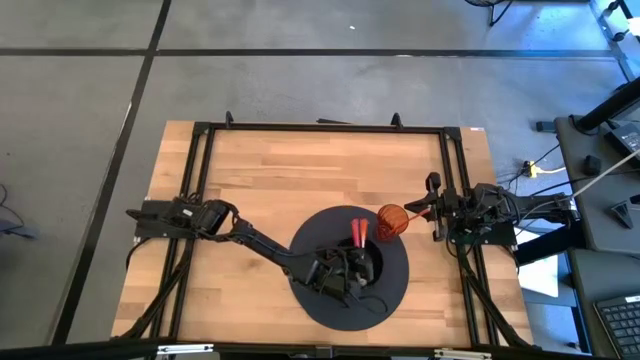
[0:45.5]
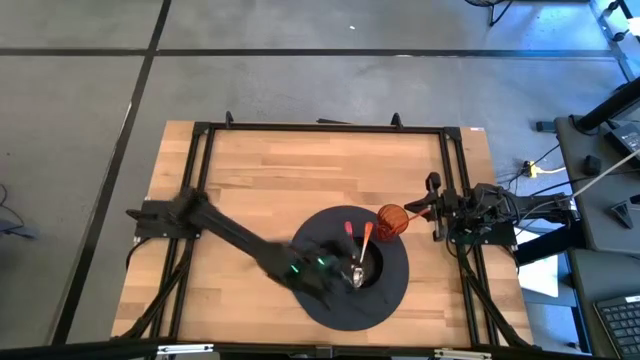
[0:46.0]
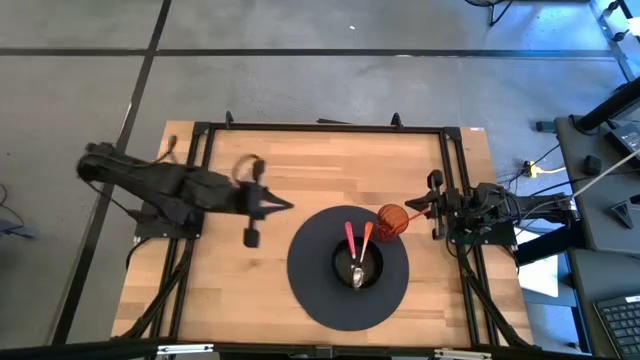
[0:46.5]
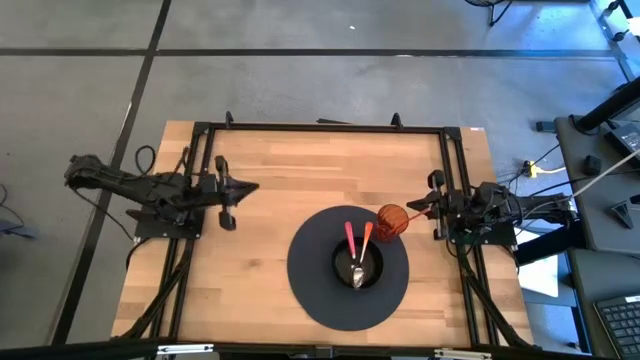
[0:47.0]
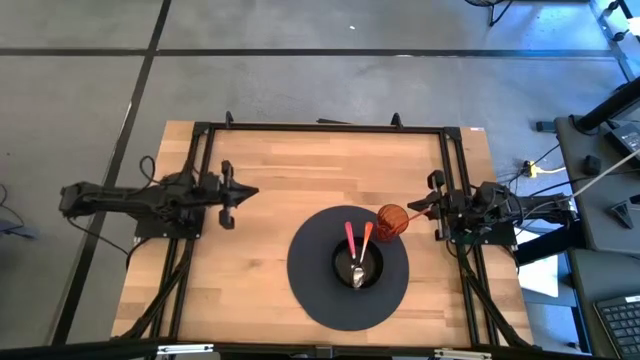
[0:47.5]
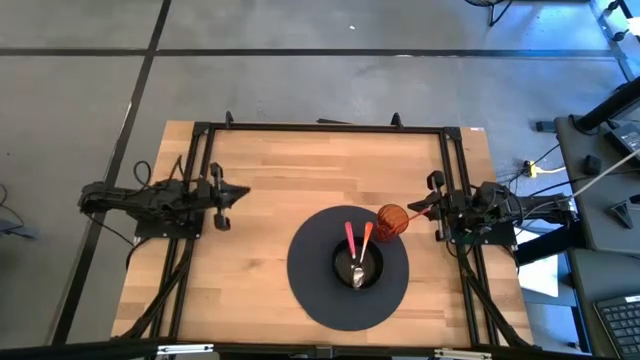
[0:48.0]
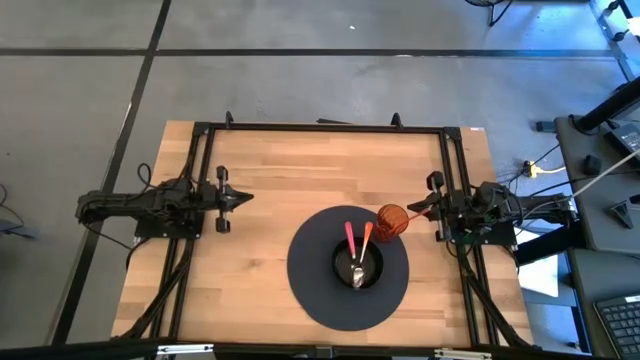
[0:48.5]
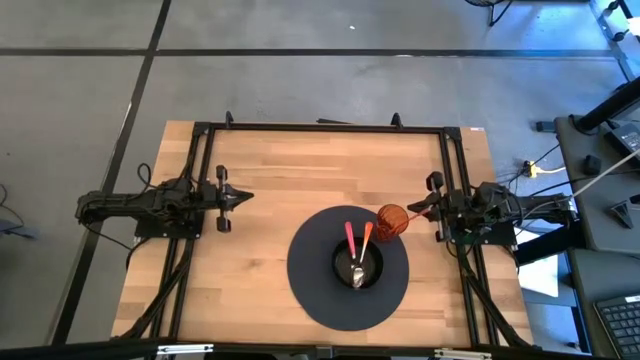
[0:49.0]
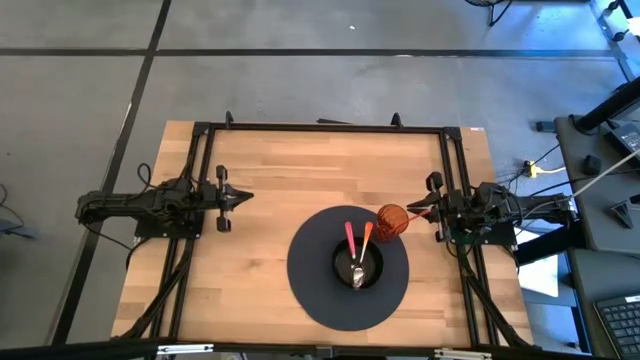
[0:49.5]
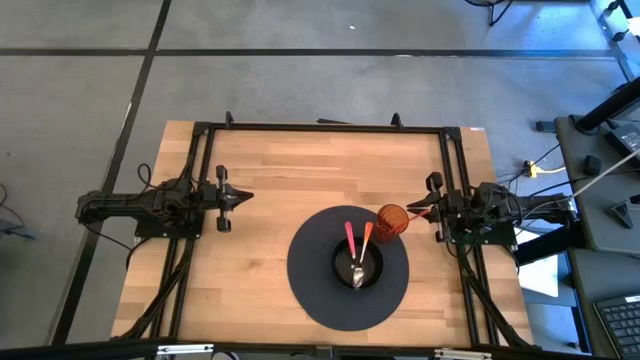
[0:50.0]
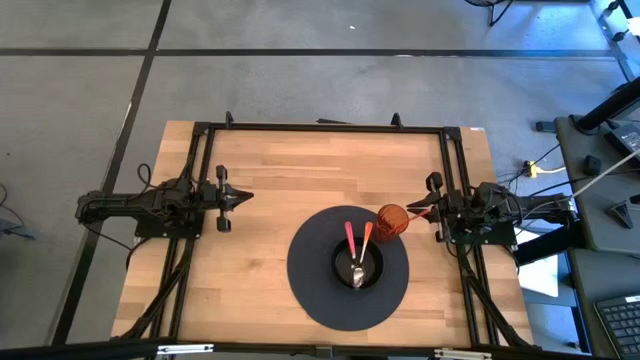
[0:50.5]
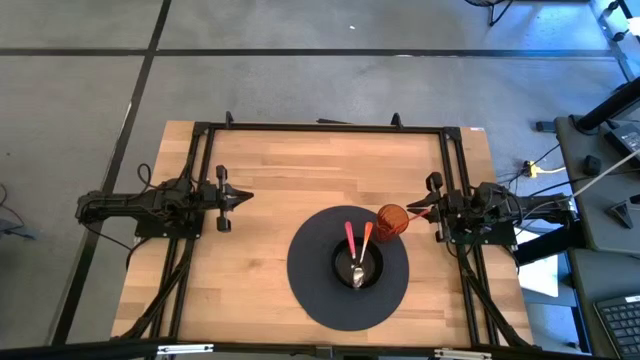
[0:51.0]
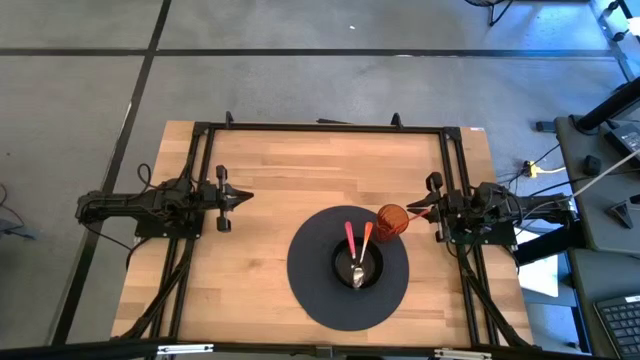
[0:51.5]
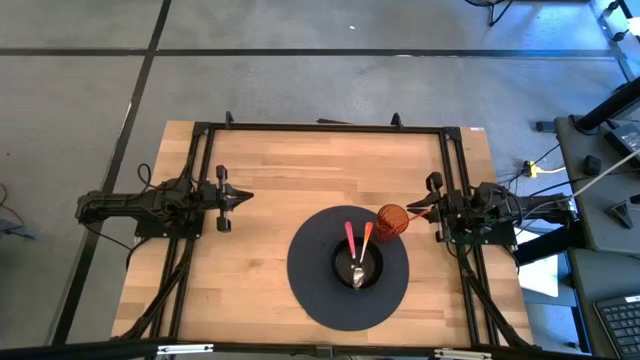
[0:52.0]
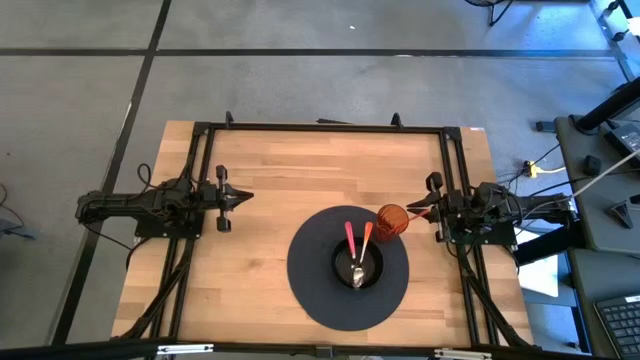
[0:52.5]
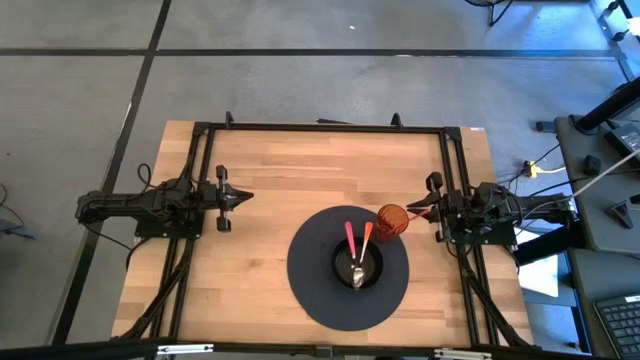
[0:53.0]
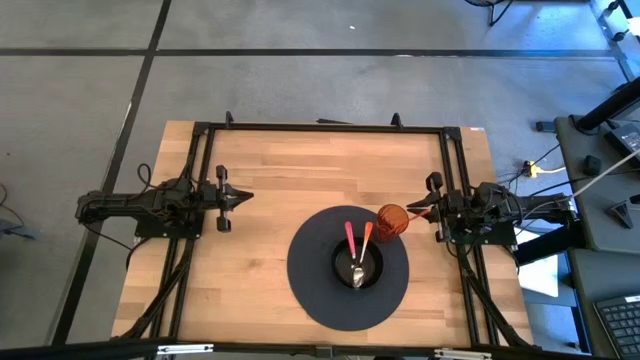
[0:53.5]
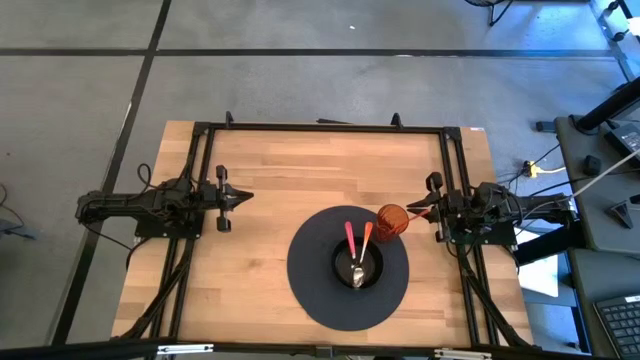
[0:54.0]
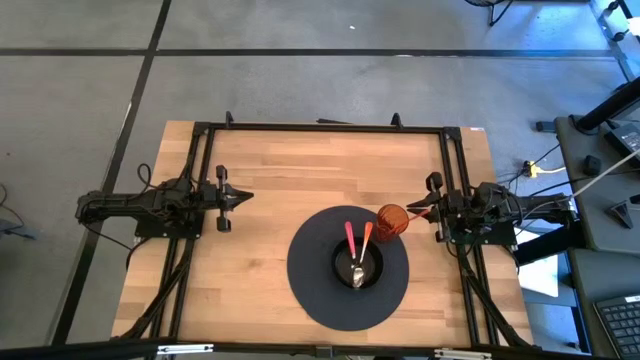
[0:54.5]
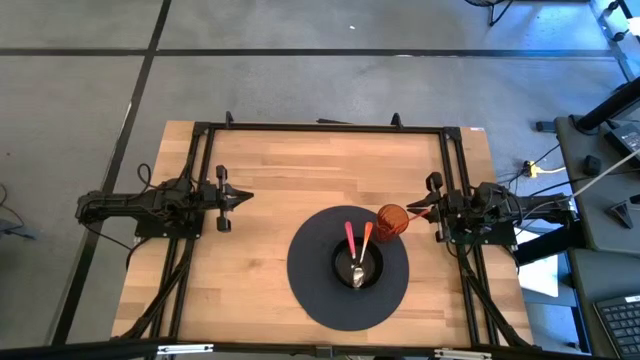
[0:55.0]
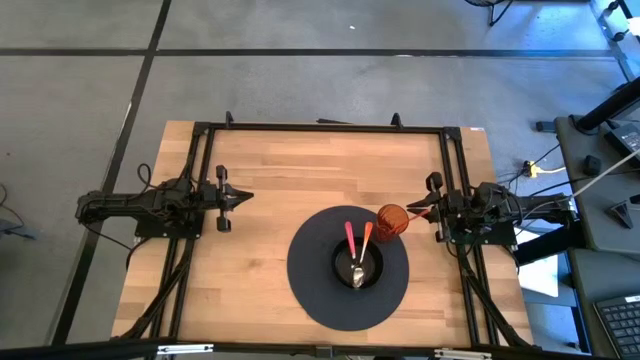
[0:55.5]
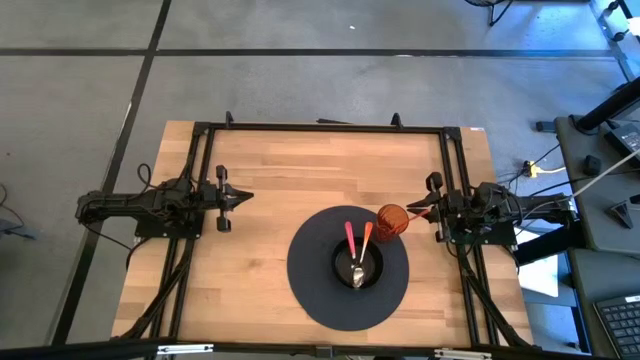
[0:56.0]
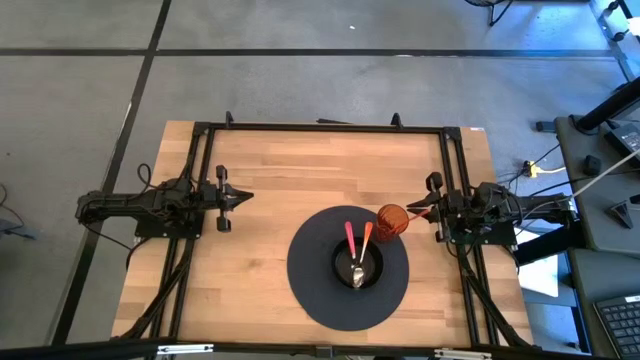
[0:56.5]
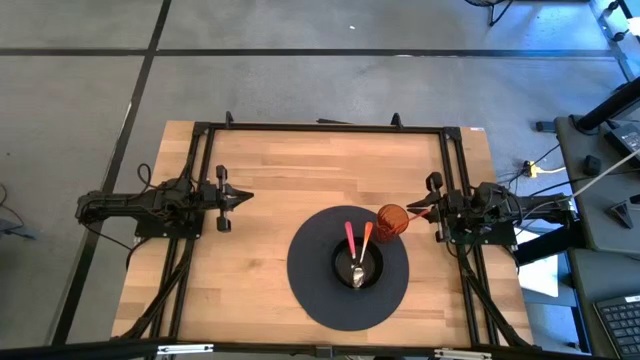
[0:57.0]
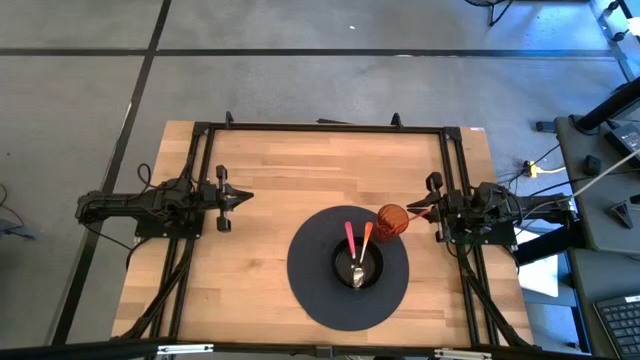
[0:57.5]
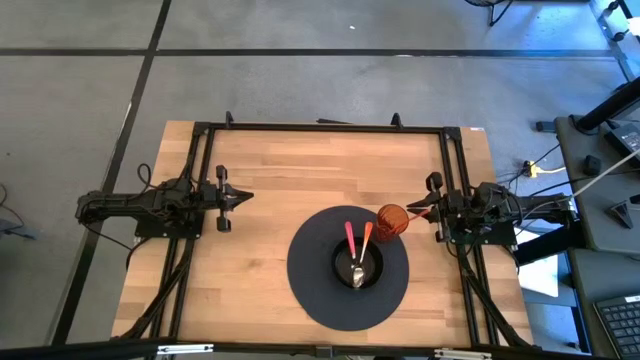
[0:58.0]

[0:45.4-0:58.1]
Task: Pick & Place Utensil
Return to Home Position

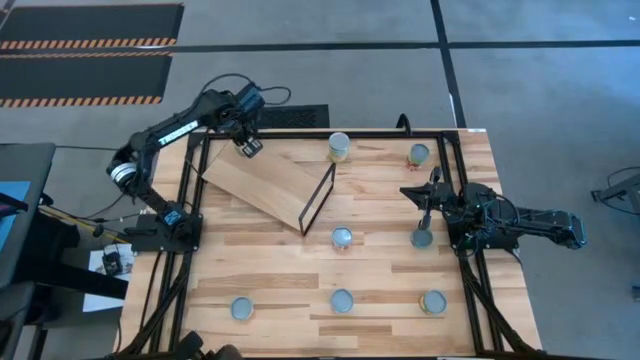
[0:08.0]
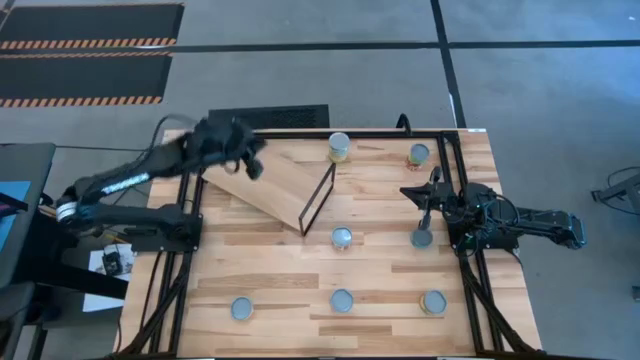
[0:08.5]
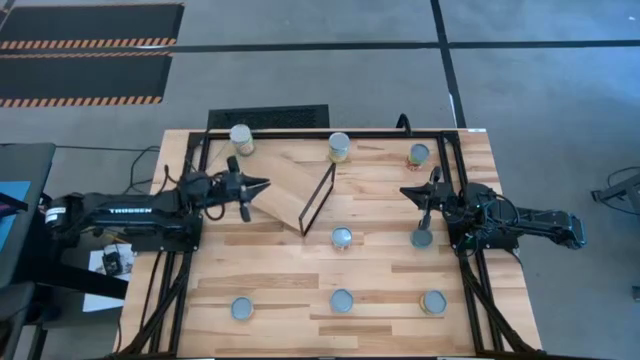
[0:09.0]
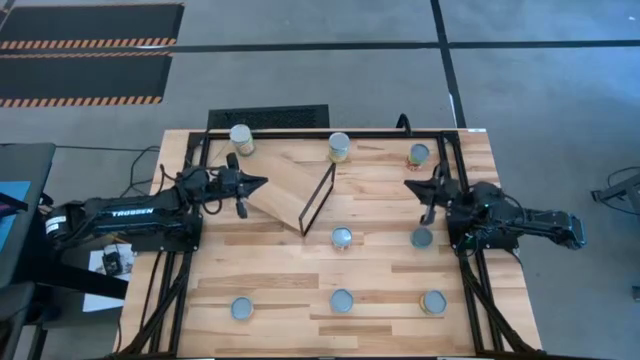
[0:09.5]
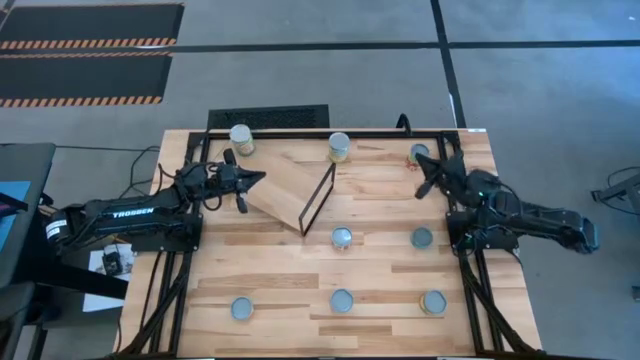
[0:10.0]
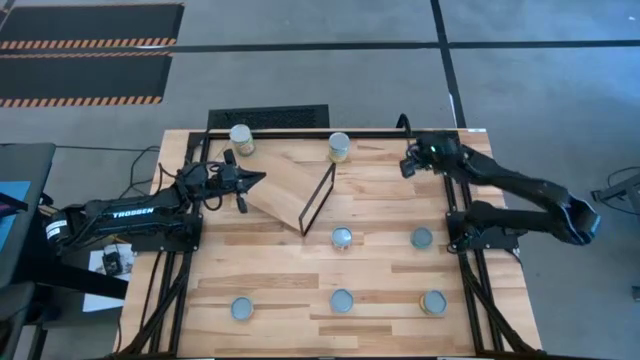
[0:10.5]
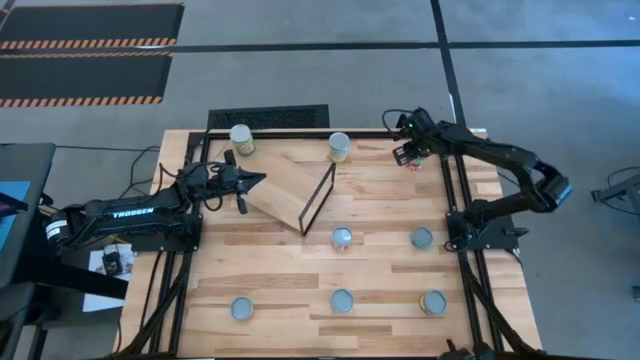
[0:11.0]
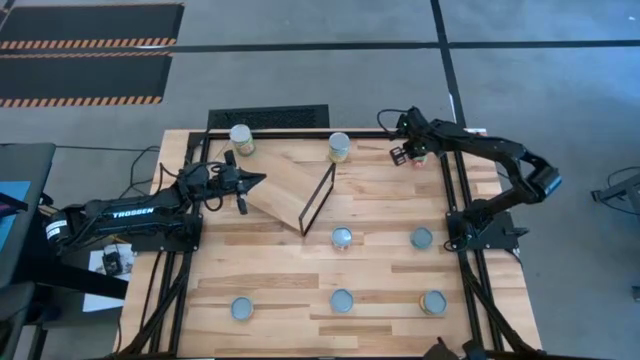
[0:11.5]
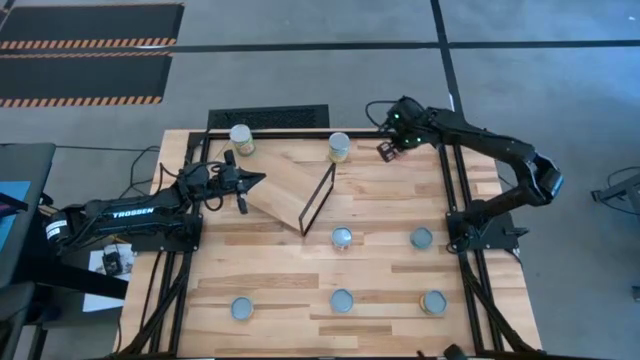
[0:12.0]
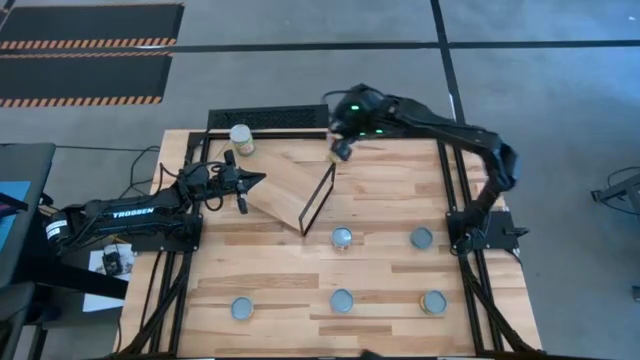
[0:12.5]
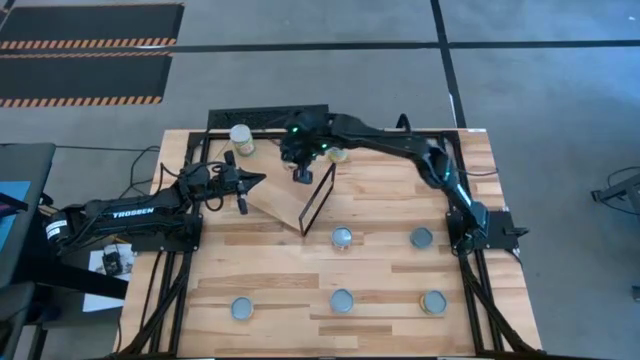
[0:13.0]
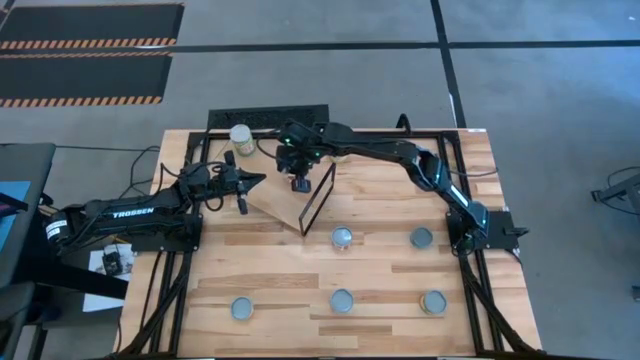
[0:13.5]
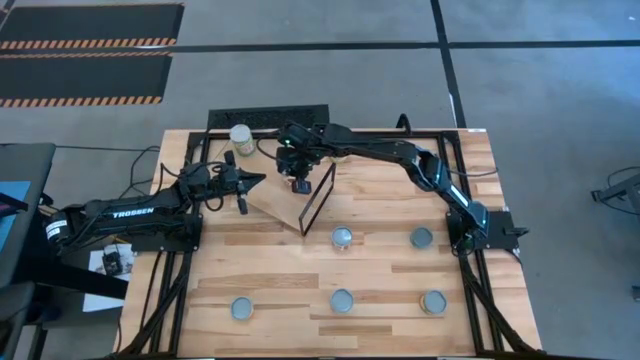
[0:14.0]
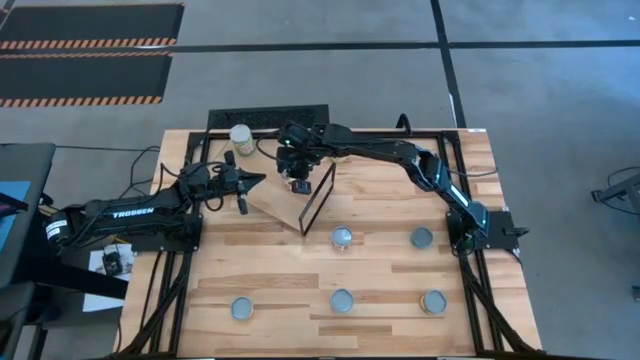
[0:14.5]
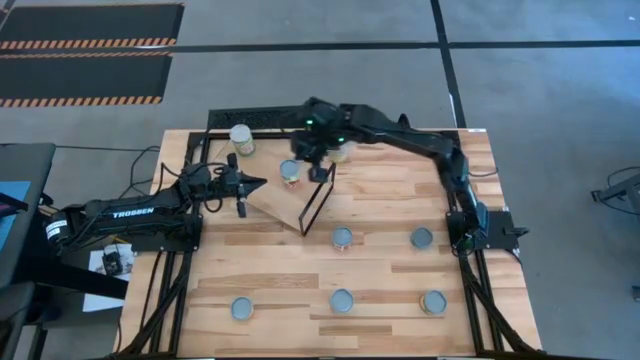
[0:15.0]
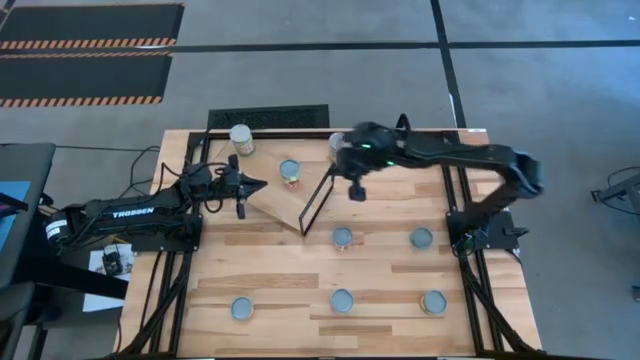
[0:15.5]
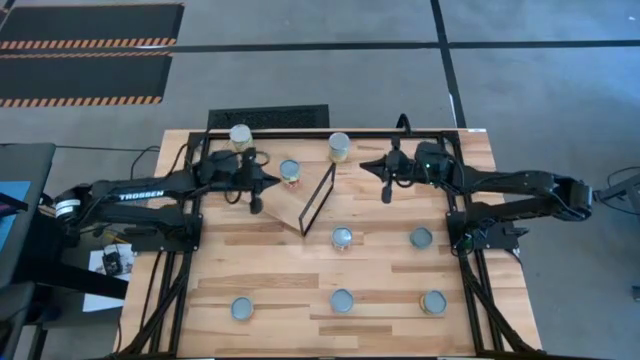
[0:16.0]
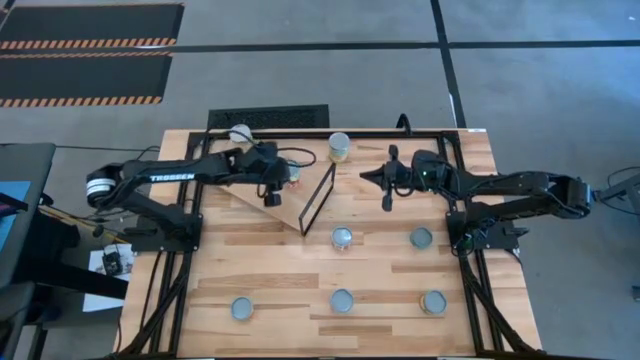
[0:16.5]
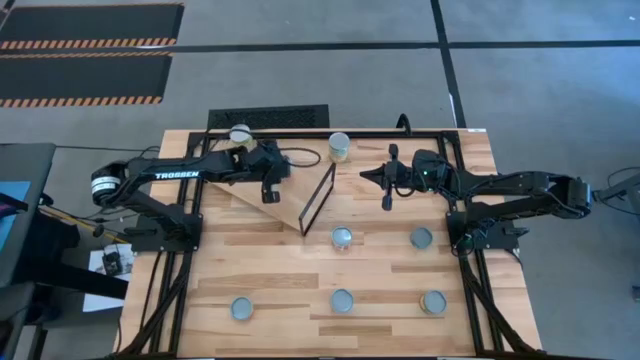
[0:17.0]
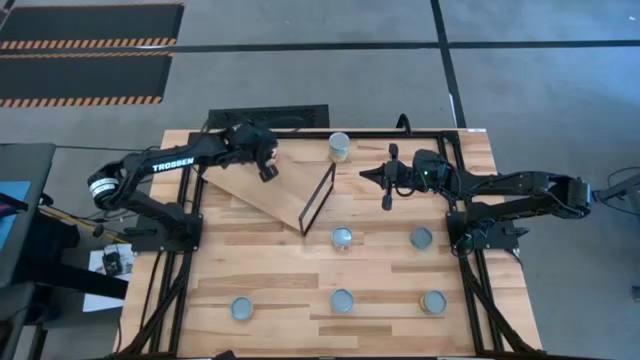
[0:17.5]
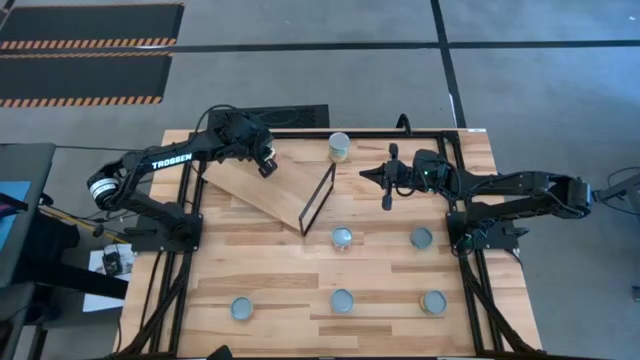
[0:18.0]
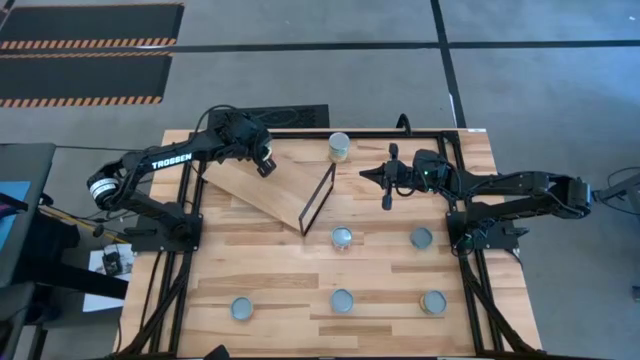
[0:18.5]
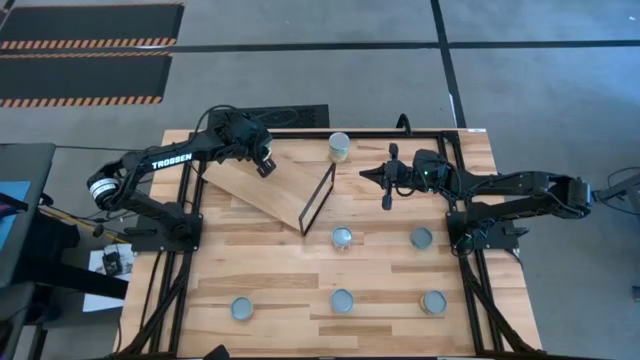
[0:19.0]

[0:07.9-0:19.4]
Task: Pick and place cans onto a shelf
Put the canned spaghetti sauce on the shelf
